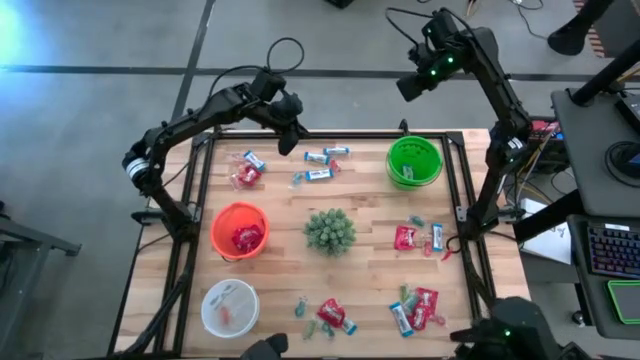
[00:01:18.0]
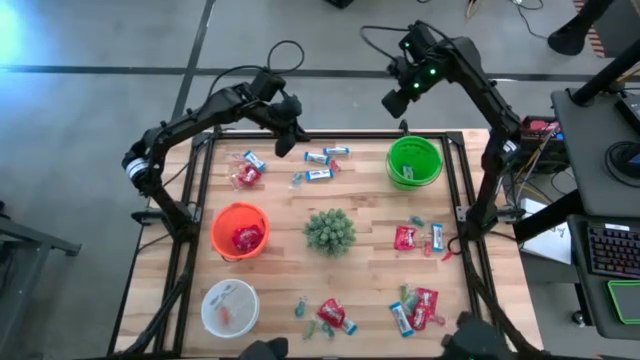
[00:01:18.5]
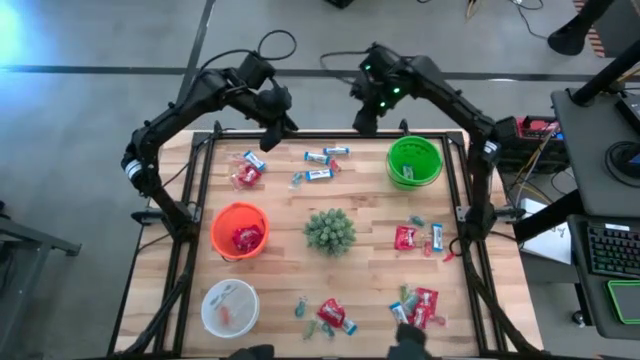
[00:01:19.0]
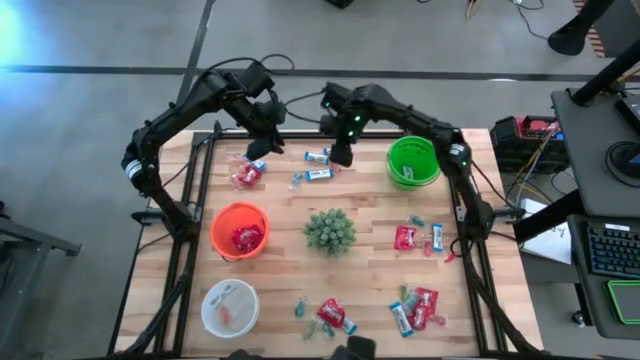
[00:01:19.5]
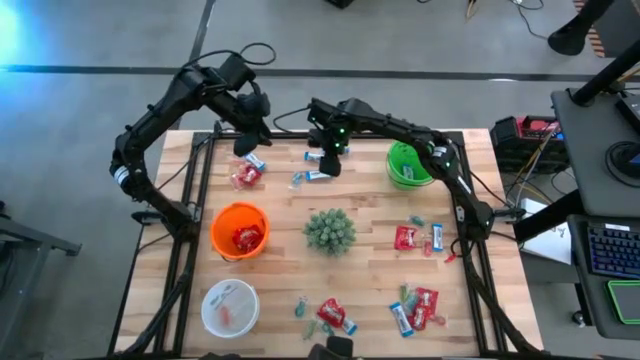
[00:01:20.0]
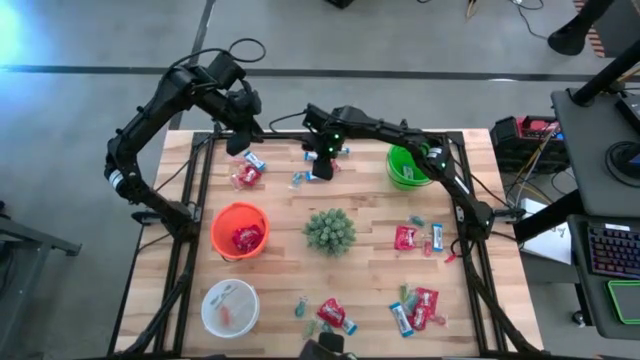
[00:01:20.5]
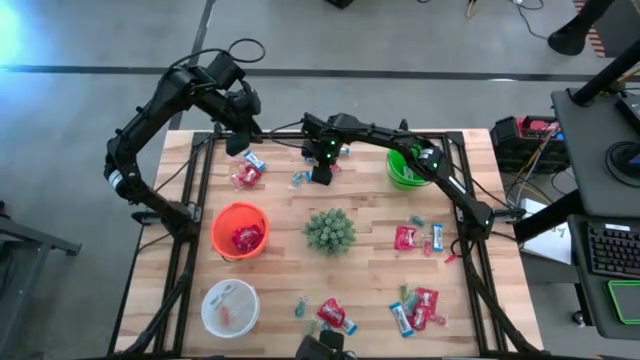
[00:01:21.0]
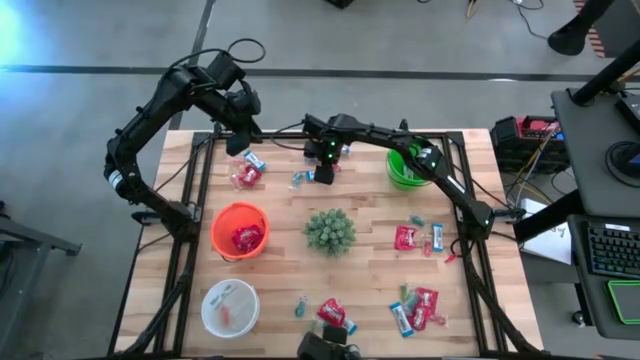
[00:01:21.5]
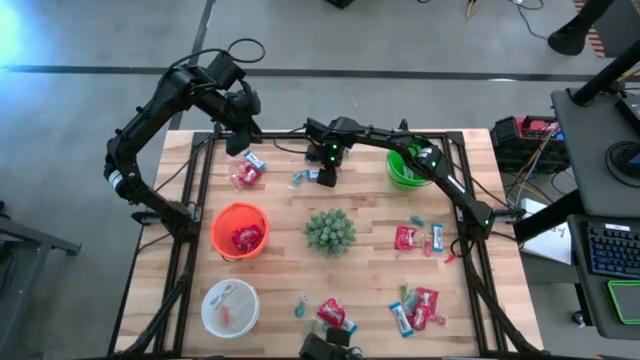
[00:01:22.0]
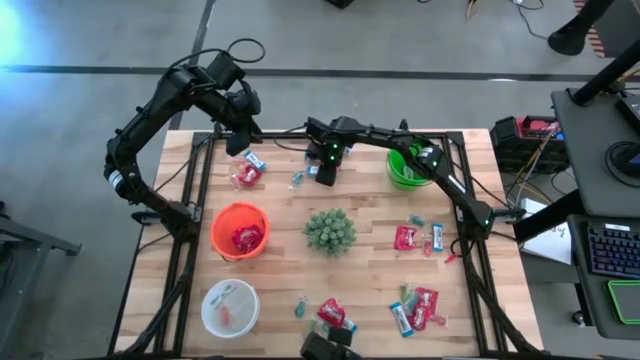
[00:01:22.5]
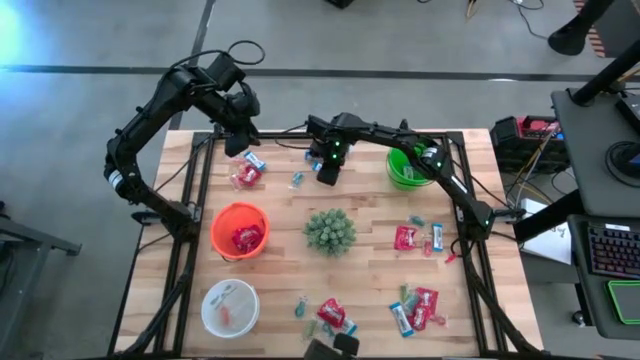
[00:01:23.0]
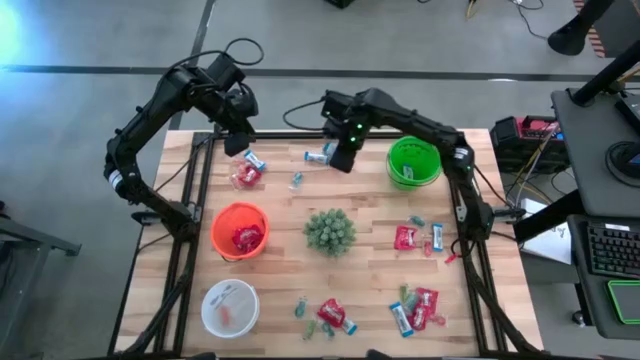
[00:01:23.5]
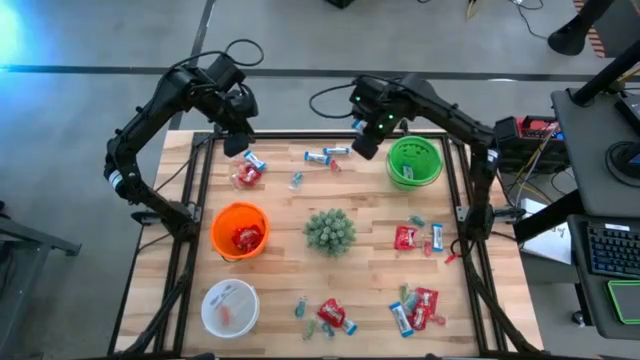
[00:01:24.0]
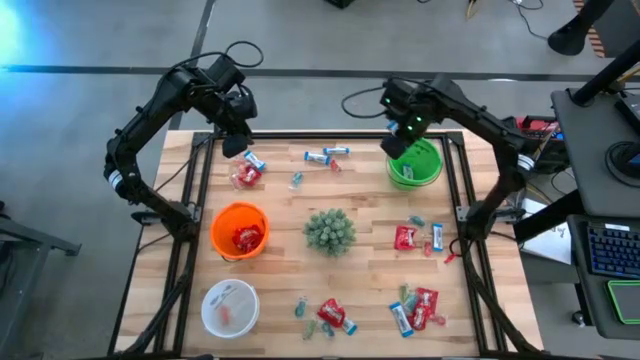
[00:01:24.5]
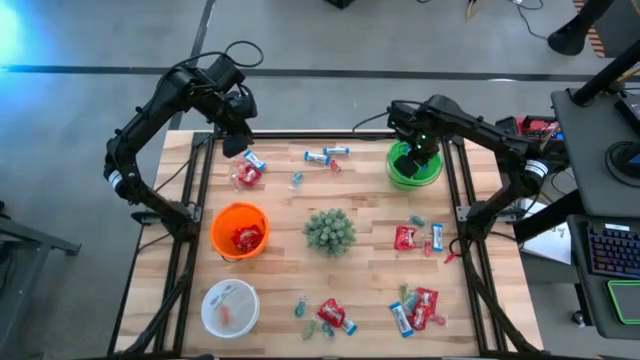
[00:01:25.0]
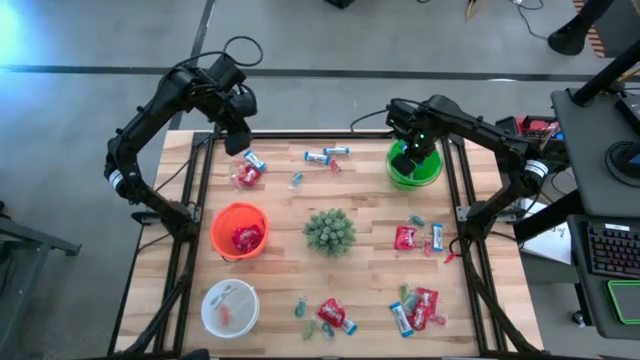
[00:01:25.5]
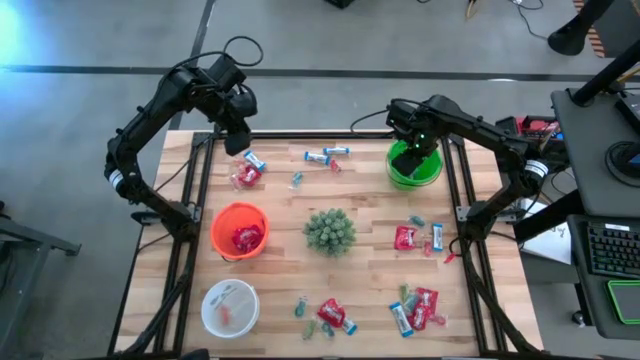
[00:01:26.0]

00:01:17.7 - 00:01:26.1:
Task: Sort candy
Put the white chocolate into the green bucket

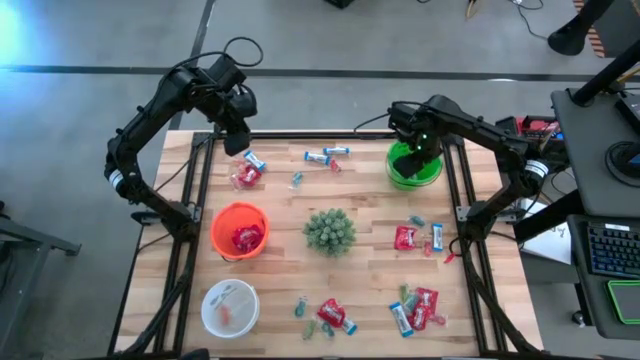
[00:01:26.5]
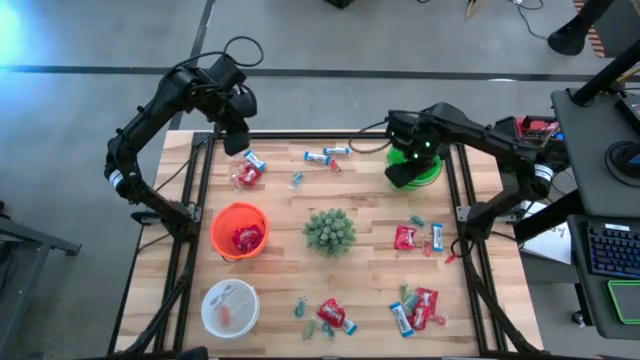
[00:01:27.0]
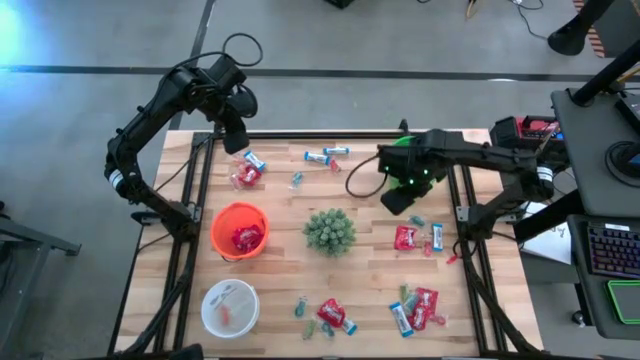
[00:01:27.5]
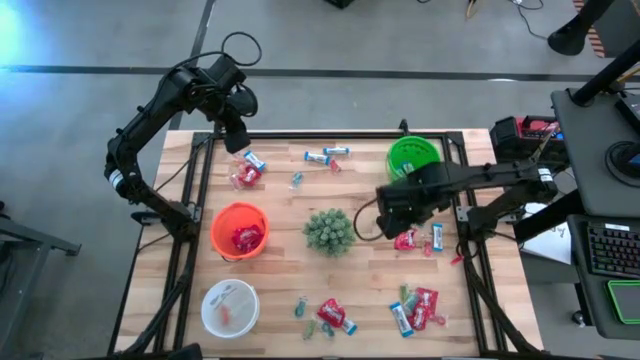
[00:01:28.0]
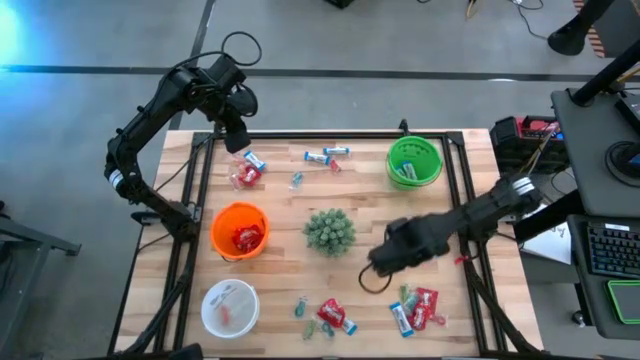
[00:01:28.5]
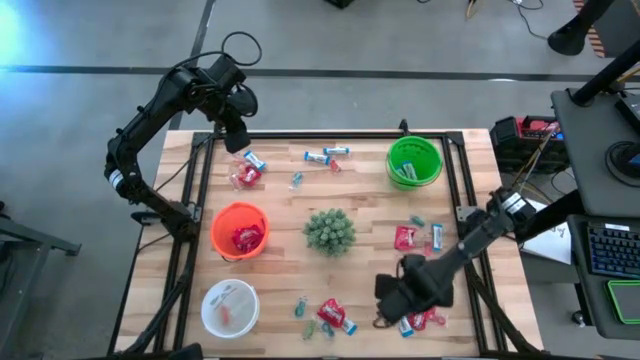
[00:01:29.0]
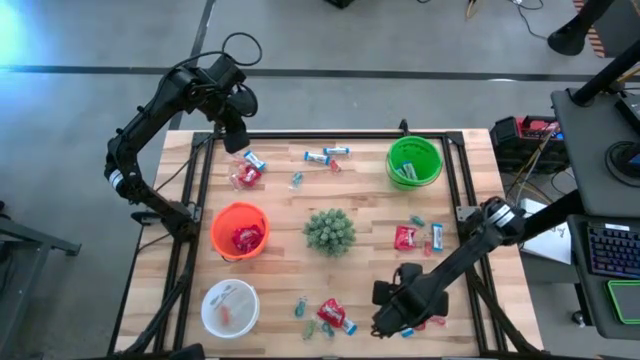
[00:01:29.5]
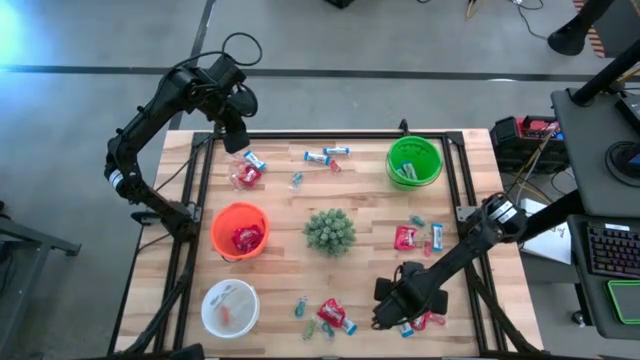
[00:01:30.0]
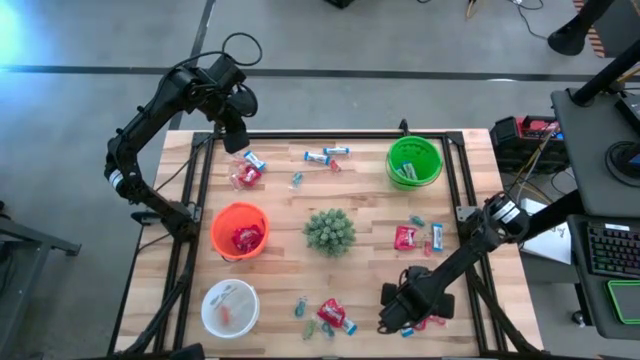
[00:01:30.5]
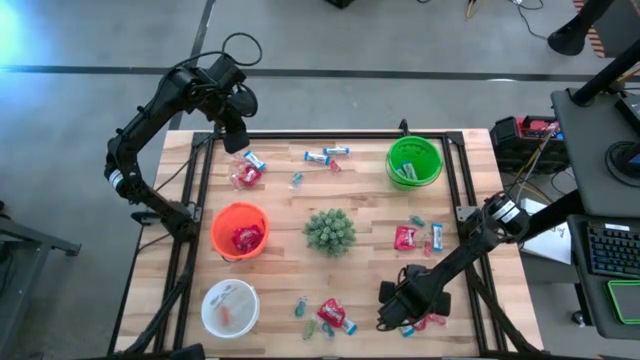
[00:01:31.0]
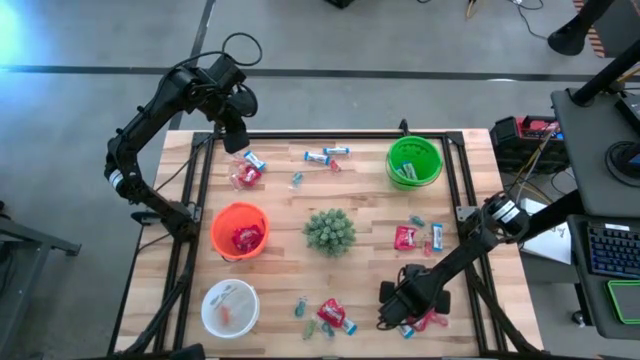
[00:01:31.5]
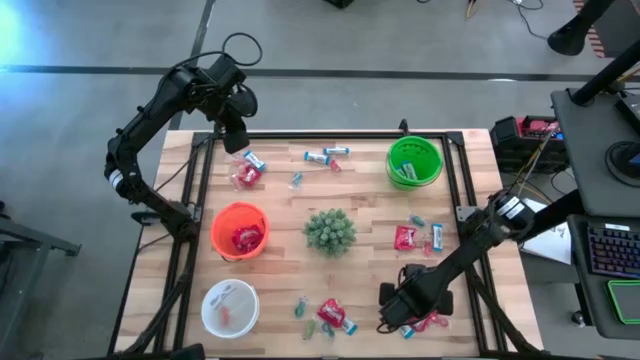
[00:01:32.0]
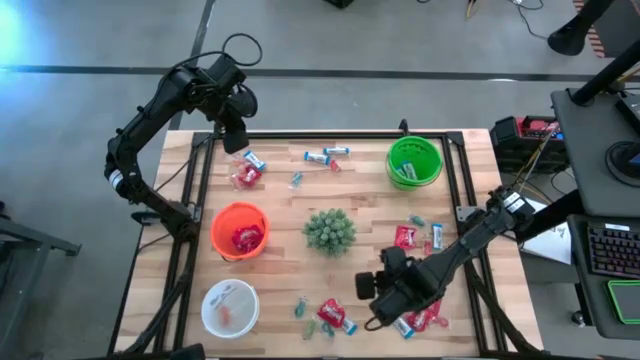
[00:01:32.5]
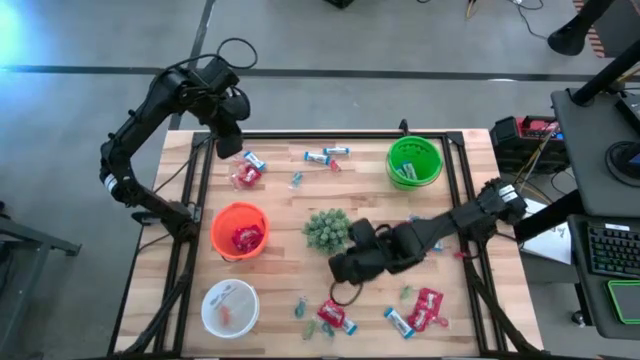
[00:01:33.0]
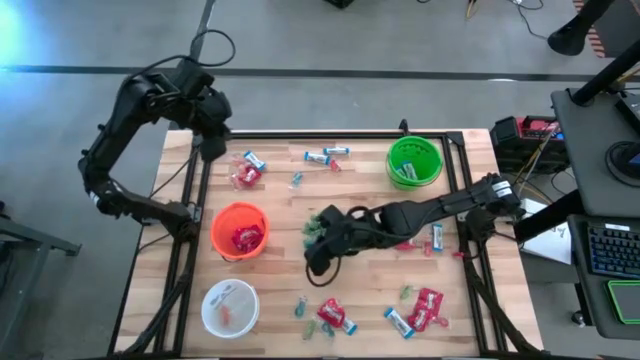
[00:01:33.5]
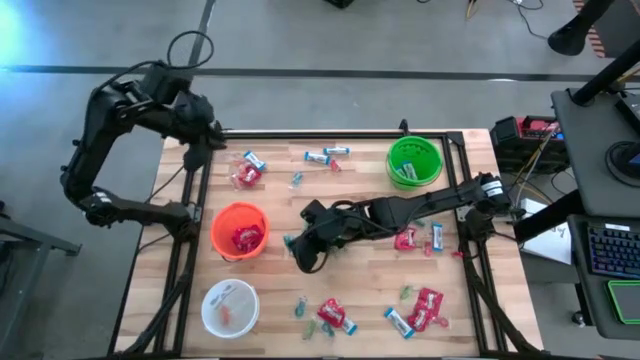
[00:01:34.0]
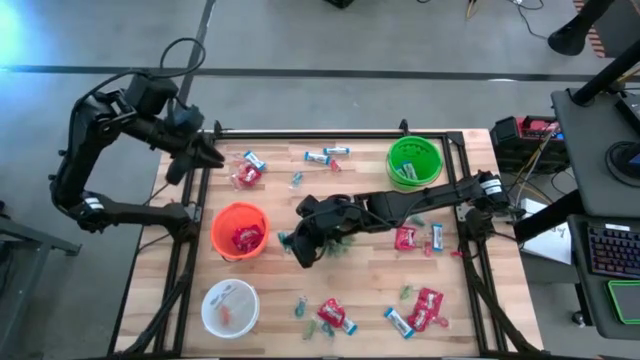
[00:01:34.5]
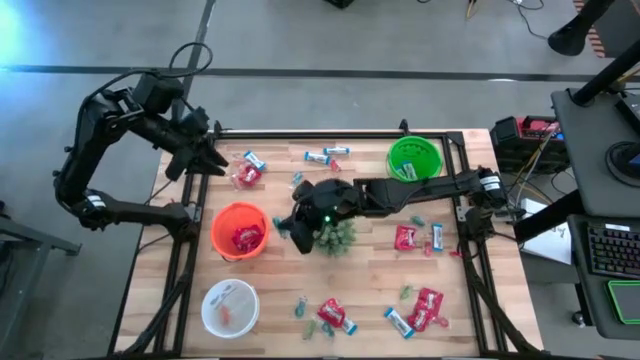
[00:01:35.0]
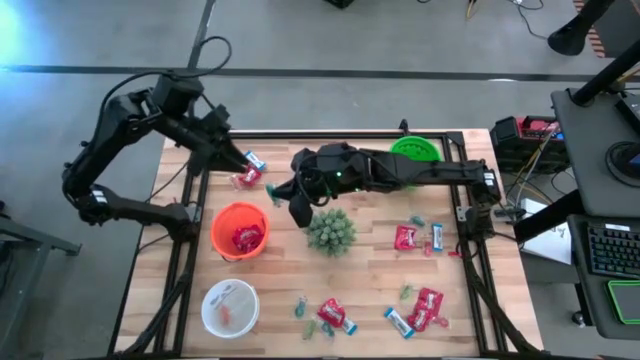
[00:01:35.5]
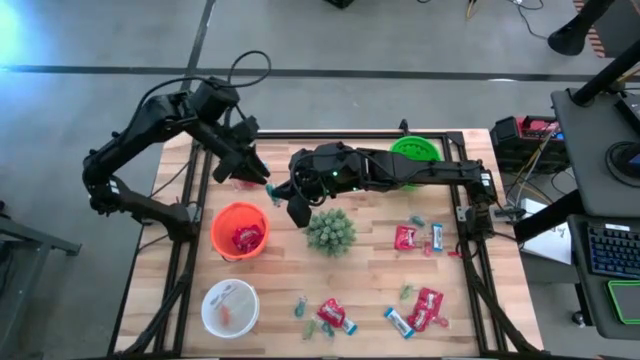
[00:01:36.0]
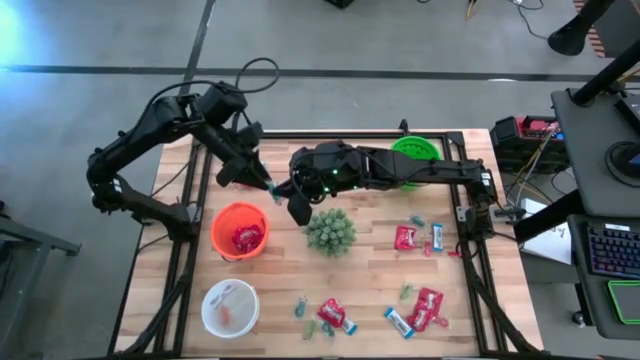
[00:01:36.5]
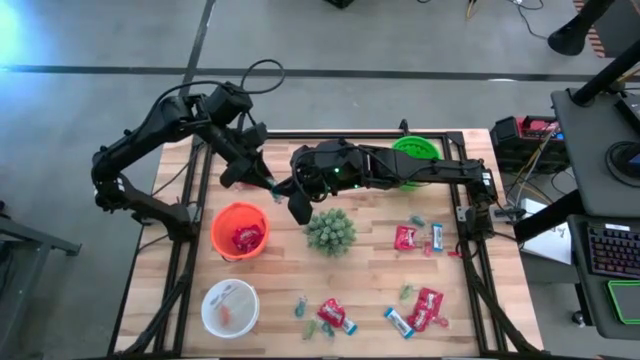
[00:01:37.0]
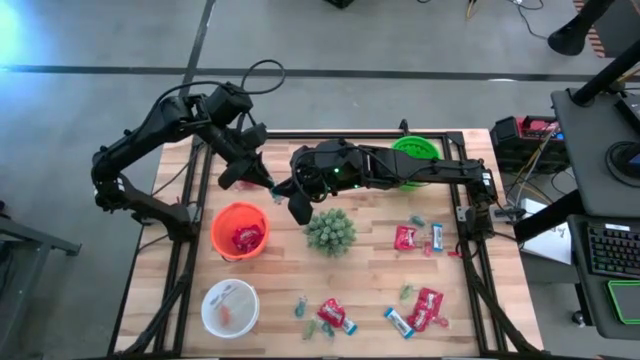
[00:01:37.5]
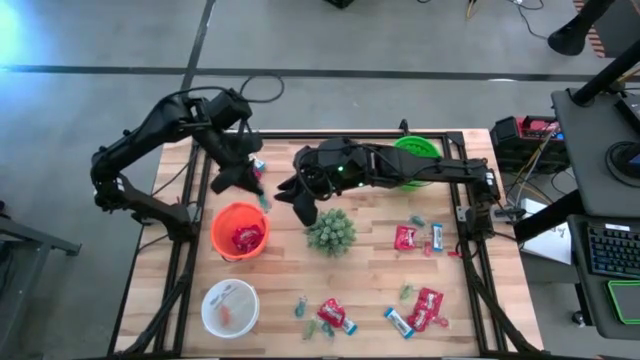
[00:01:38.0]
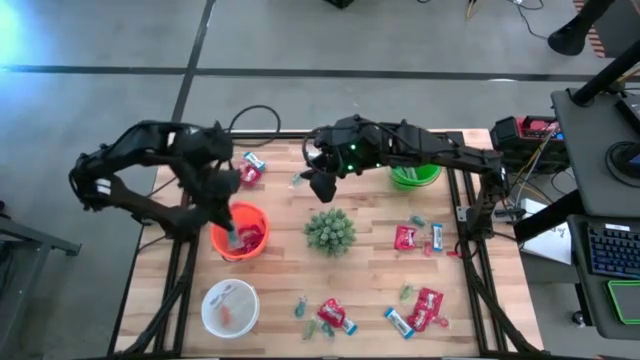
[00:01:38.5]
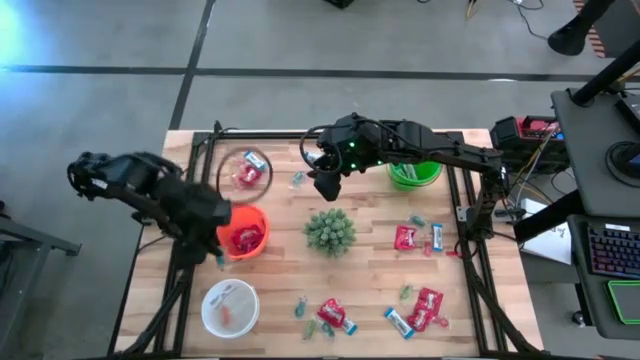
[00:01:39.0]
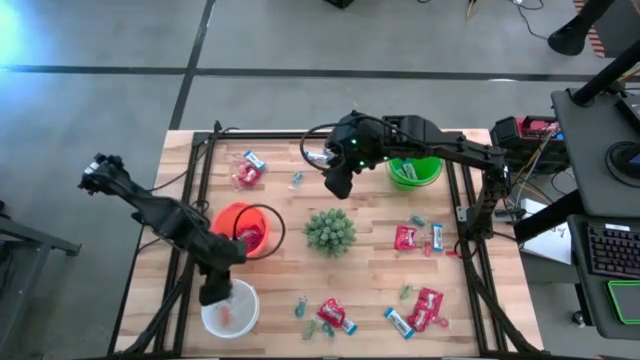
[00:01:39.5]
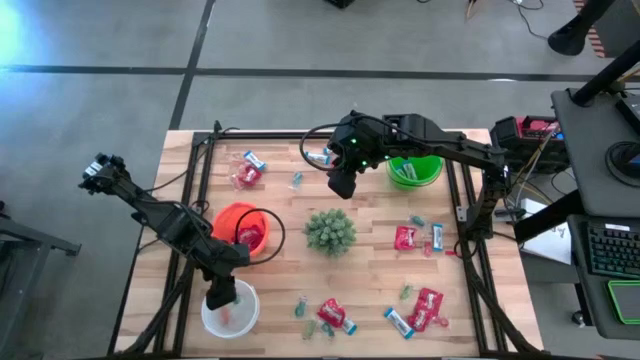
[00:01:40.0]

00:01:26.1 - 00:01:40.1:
Put the blue gummy into the white bucket
